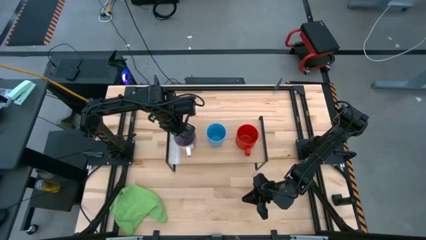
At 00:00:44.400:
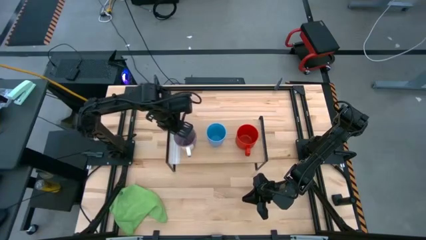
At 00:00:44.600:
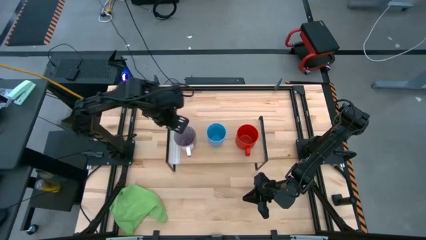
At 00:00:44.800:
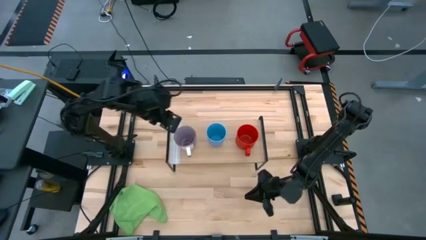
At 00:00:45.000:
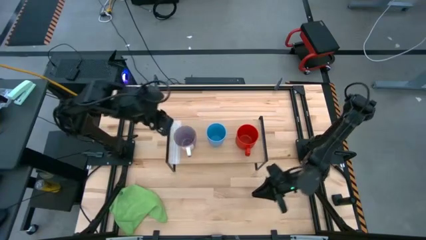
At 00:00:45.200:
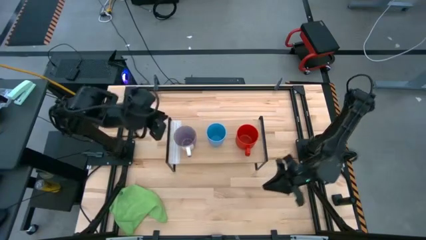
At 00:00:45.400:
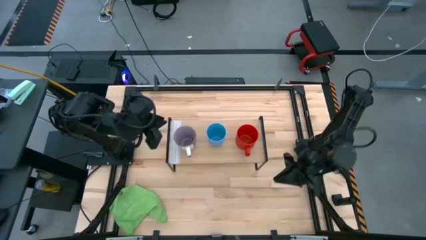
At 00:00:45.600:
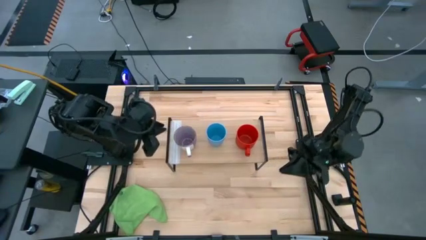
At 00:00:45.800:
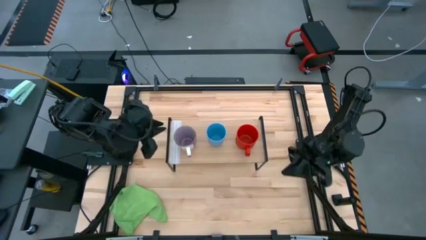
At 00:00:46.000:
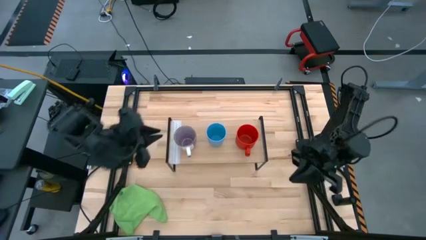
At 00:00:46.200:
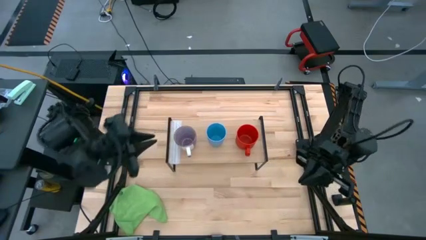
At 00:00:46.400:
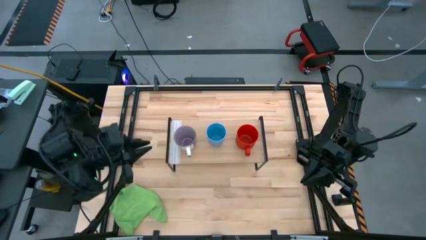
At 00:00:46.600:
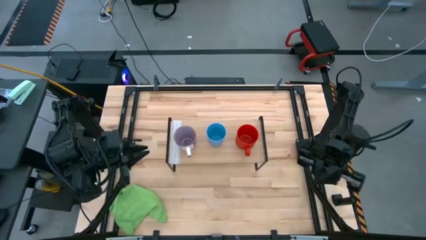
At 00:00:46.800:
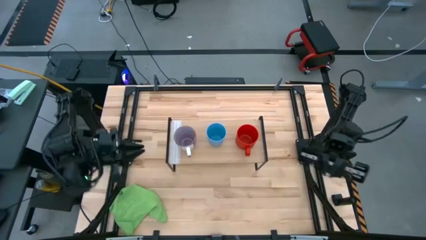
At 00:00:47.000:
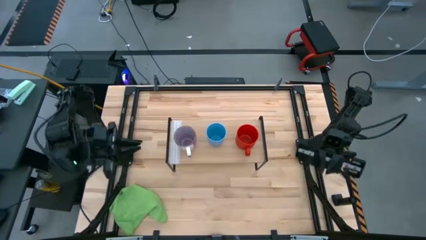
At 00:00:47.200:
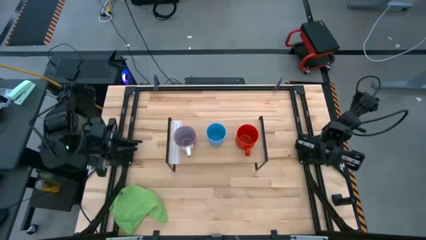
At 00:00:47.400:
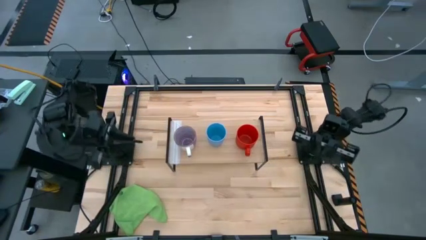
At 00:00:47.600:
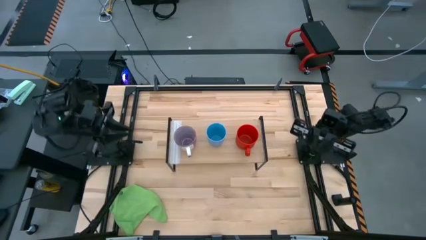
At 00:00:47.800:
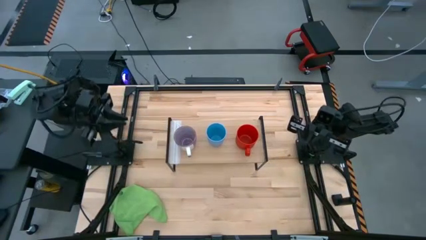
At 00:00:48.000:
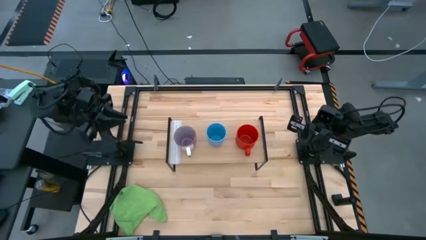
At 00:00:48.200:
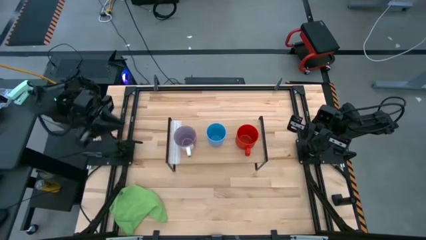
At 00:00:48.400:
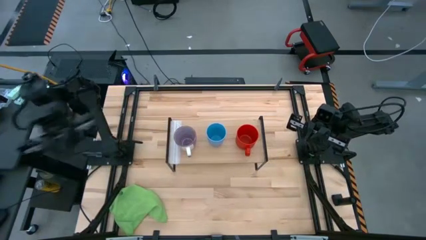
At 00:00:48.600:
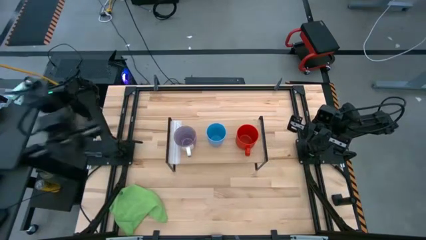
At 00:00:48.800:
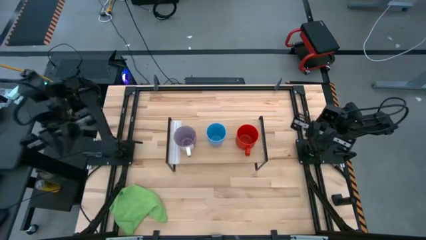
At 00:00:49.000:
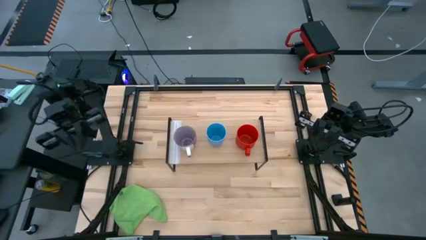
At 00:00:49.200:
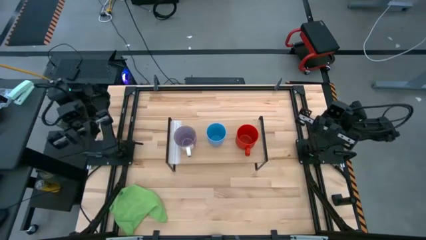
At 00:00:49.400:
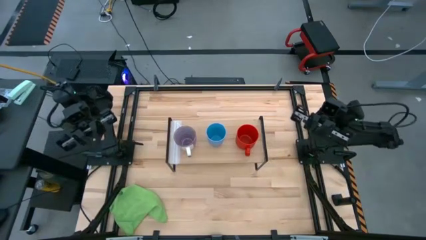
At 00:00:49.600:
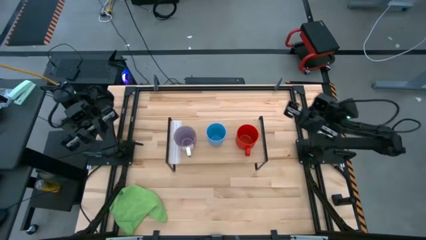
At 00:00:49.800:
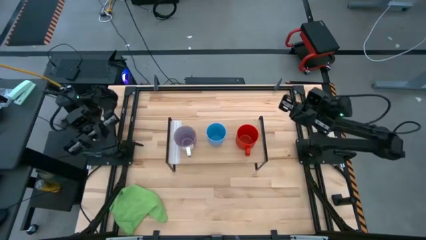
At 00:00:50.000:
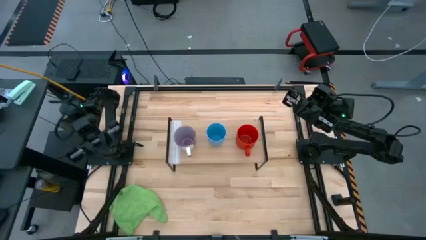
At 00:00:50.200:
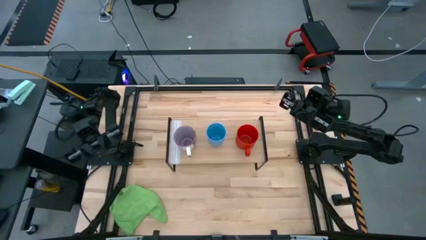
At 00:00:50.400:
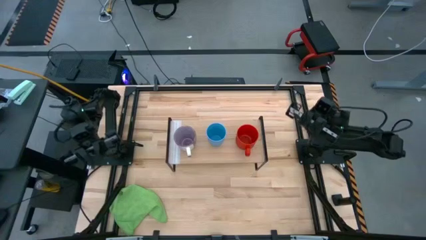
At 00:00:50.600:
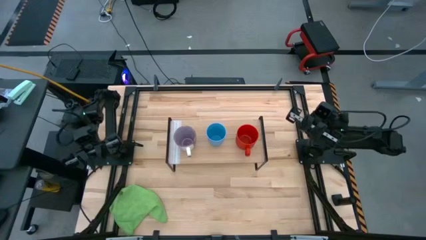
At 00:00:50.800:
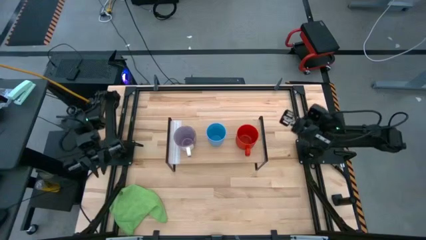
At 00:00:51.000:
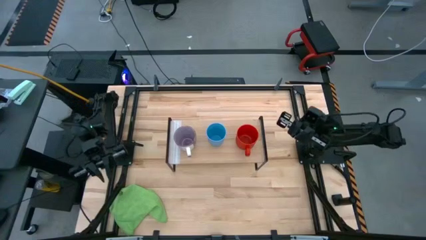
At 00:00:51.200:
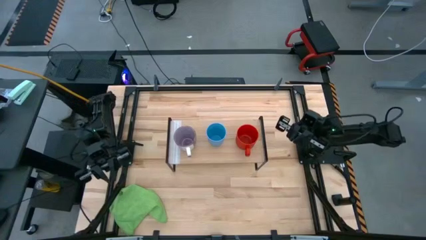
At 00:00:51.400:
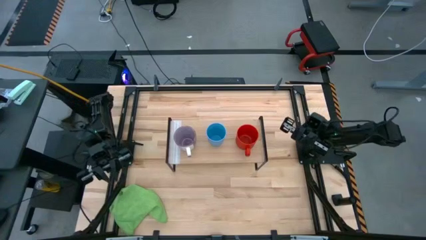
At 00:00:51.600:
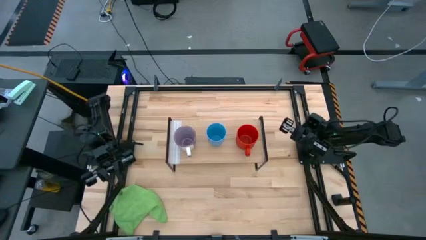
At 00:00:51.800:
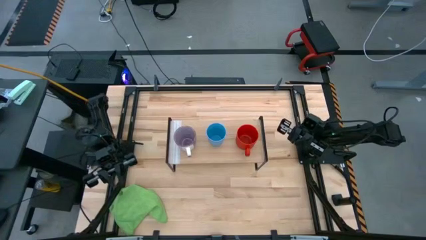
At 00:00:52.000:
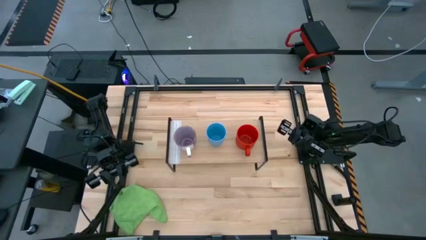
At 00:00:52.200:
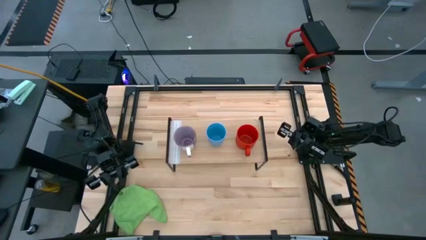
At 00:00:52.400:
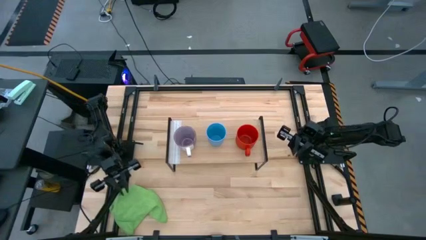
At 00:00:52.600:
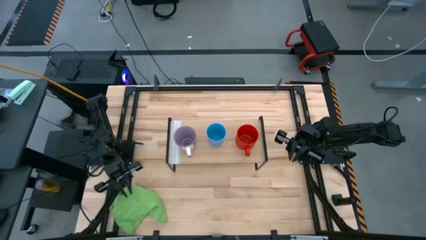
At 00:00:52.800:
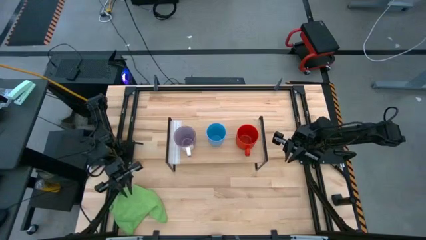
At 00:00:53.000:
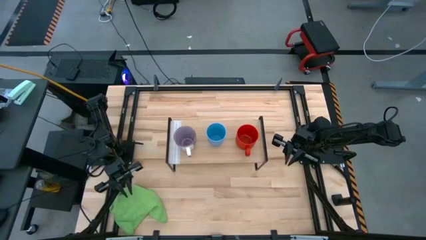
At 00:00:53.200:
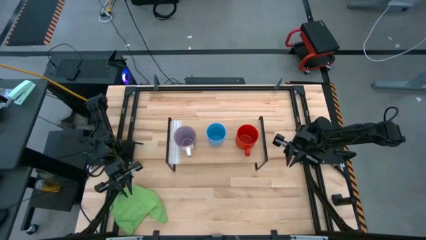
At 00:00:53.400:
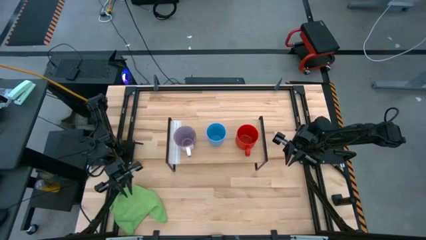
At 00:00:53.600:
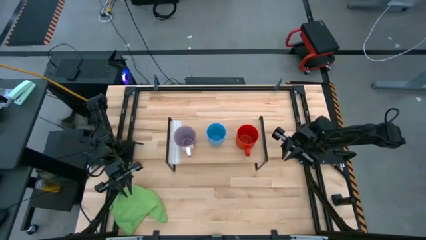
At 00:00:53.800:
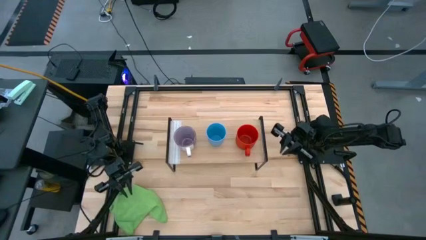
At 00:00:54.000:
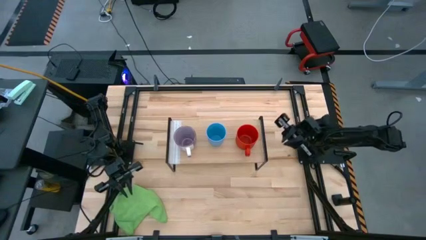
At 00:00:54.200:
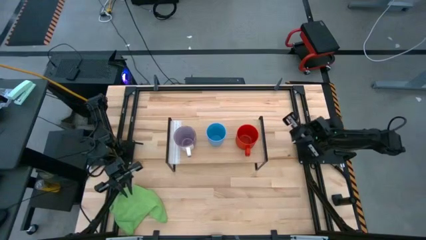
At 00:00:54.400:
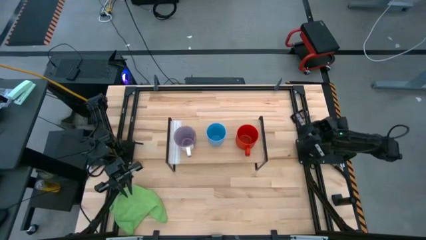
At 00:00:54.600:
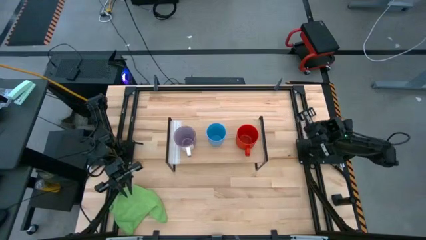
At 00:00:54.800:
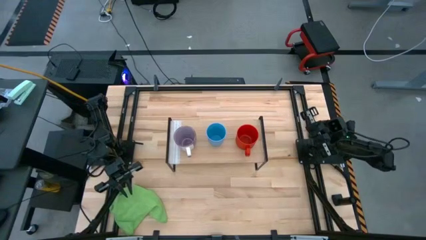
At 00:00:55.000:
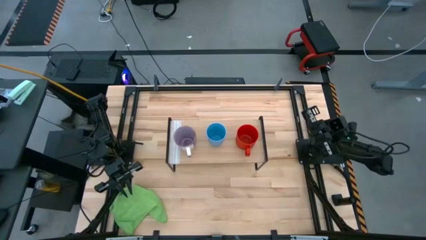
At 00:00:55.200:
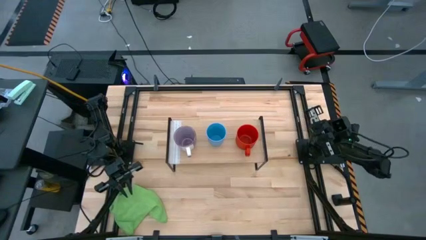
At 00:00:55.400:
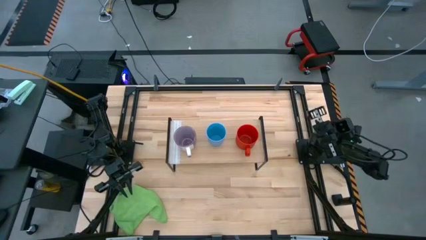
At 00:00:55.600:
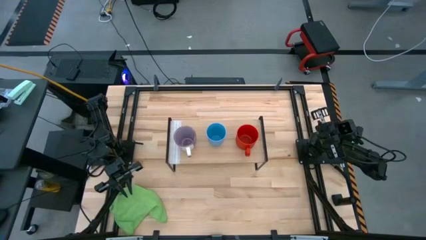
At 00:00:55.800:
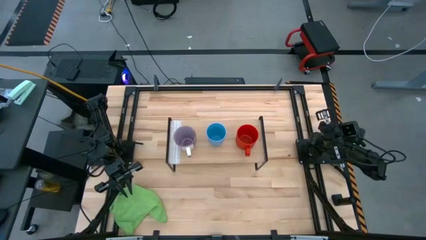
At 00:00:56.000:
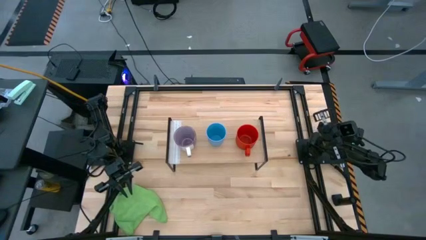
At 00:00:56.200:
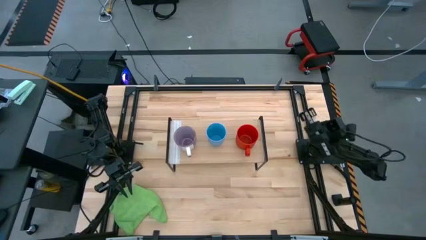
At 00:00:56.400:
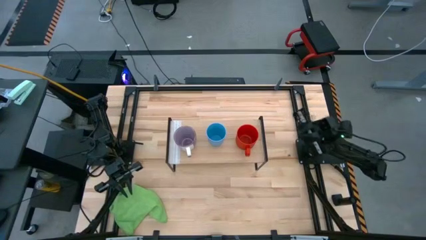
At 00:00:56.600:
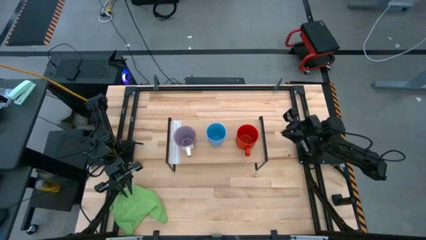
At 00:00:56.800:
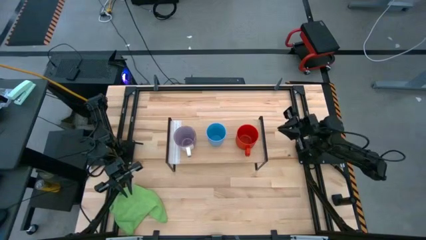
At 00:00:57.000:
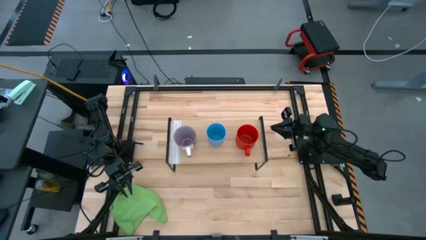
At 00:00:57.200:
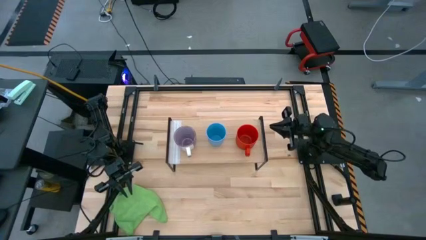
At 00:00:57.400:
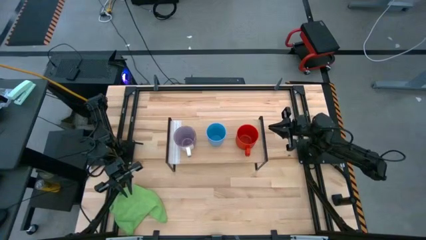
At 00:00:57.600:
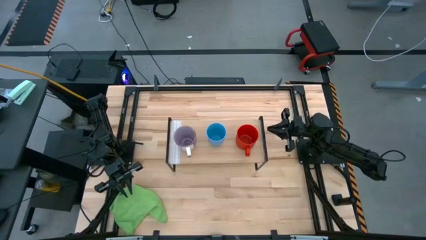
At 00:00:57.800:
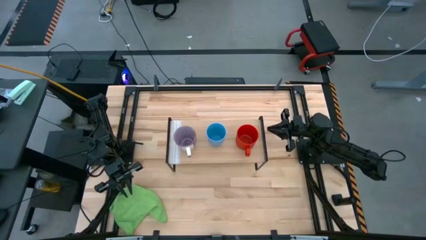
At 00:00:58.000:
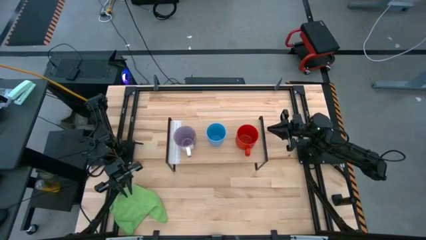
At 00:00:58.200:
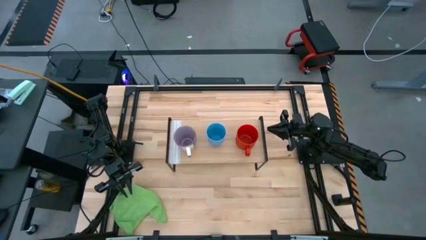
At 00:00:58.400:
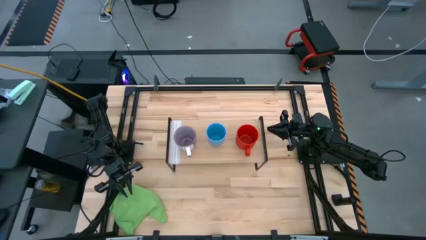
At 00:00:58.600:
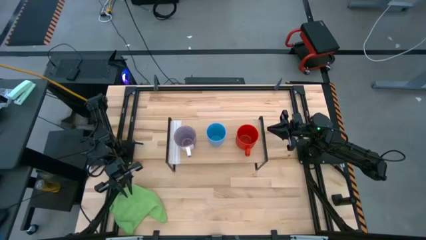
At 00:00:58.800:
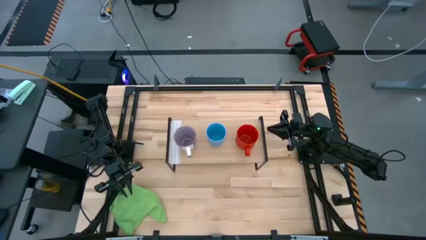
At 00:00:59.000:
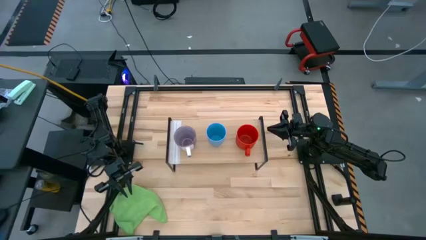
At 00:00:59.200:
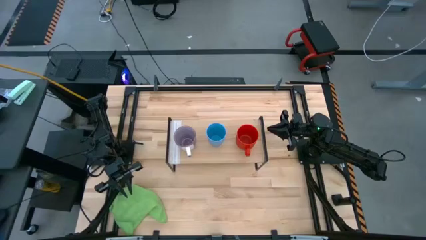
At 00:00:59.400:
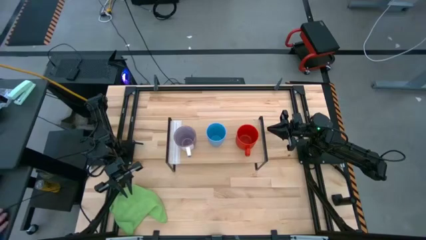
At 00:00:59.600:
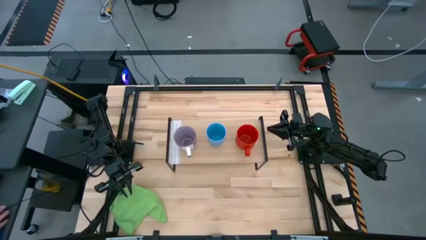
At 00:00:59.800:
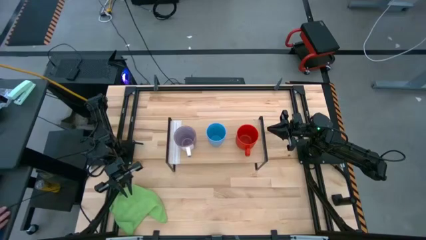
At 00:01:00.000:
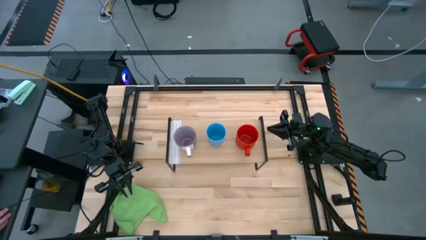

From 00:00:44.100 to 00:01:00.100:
Task: Stack small to large cups/mugs on shelf
Return to Home Position
